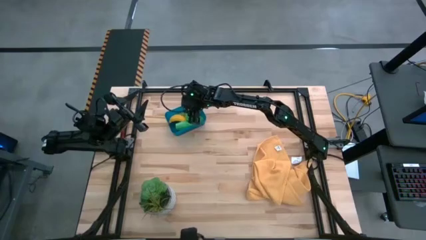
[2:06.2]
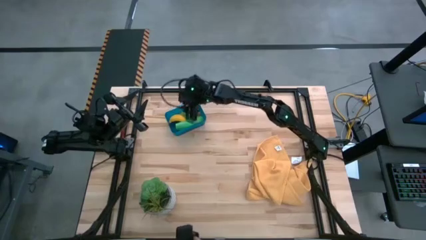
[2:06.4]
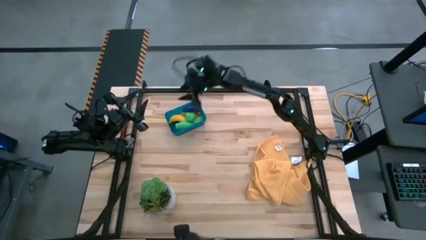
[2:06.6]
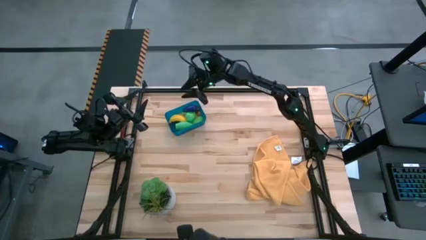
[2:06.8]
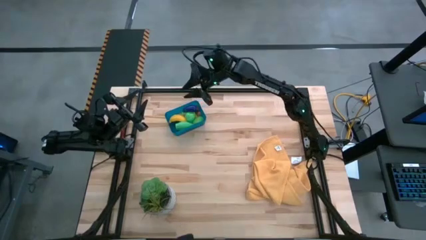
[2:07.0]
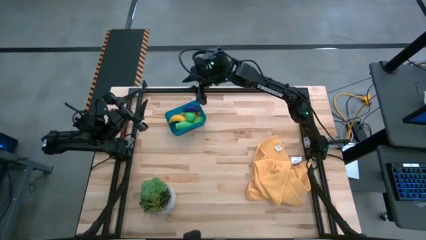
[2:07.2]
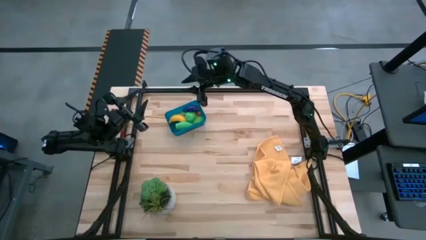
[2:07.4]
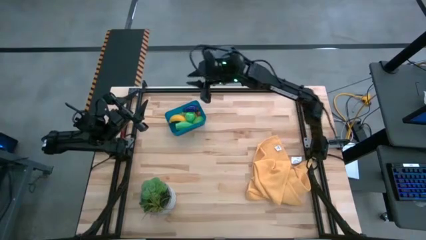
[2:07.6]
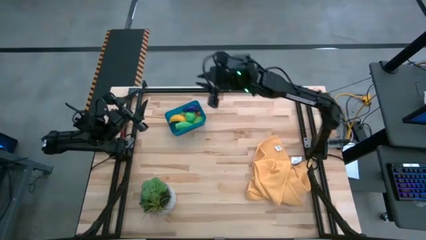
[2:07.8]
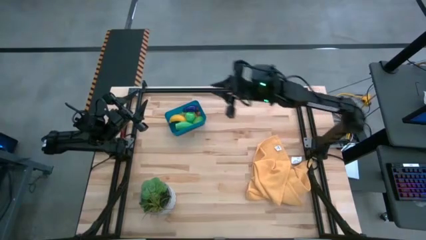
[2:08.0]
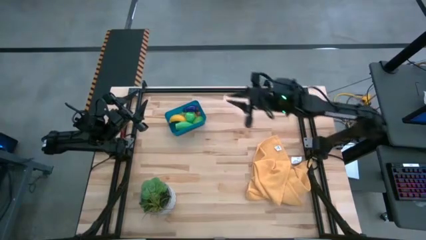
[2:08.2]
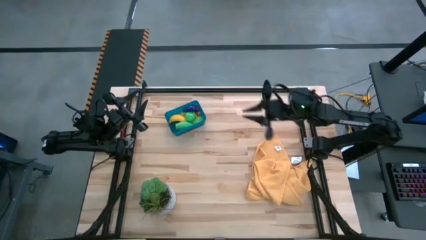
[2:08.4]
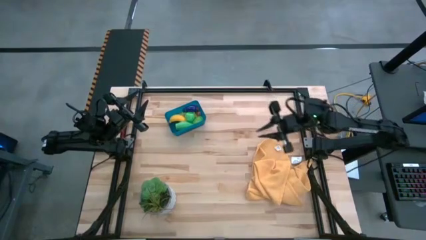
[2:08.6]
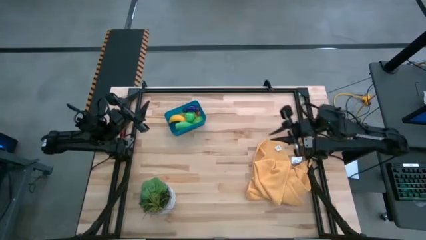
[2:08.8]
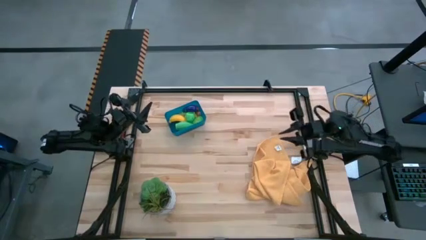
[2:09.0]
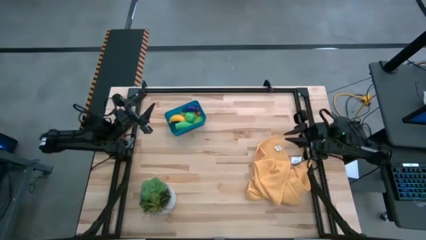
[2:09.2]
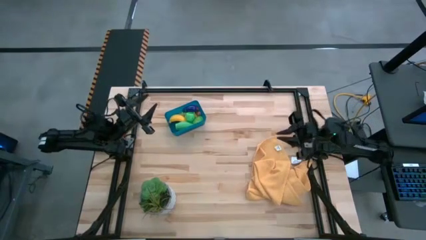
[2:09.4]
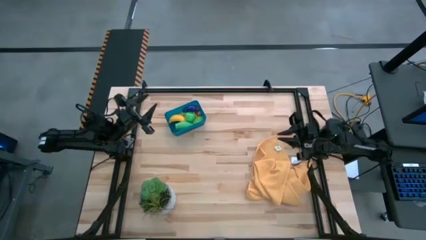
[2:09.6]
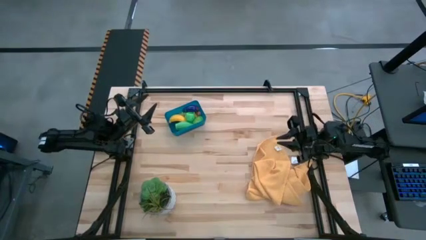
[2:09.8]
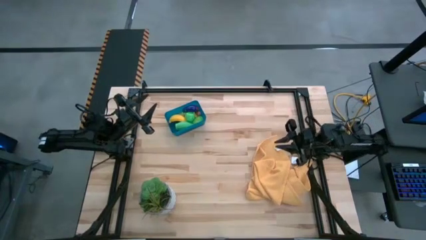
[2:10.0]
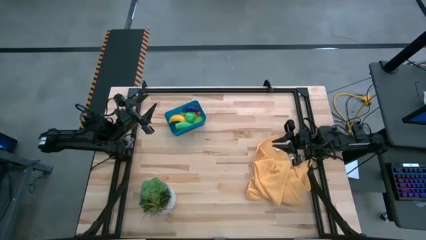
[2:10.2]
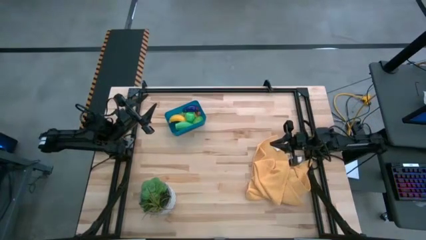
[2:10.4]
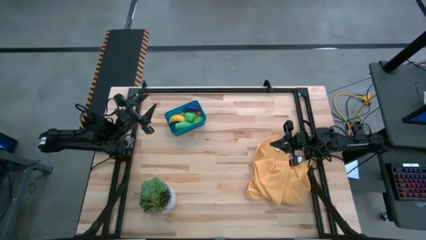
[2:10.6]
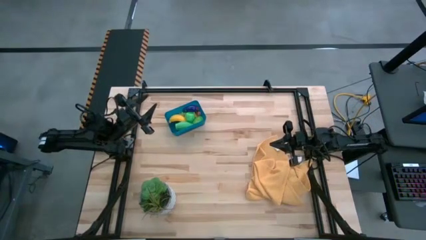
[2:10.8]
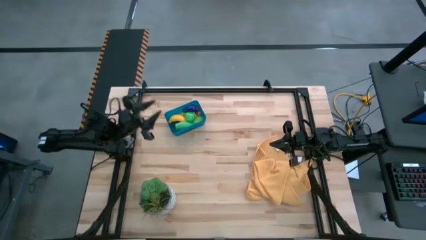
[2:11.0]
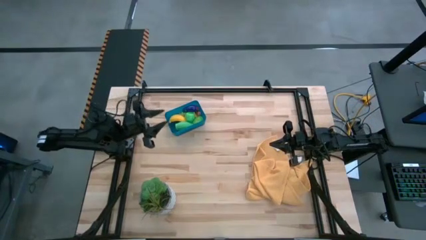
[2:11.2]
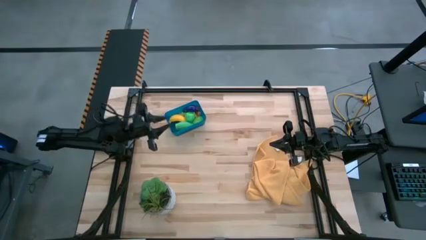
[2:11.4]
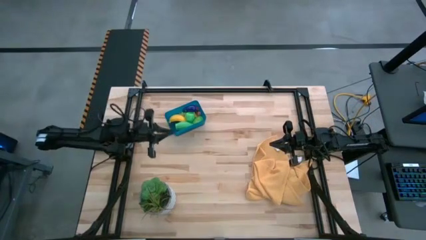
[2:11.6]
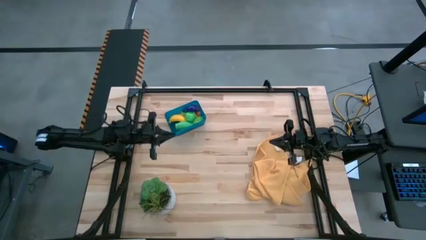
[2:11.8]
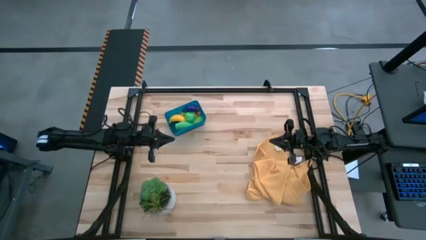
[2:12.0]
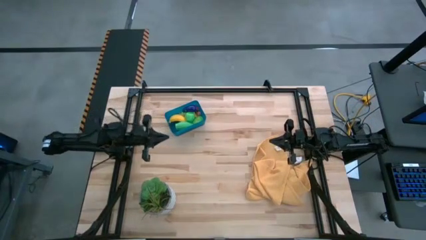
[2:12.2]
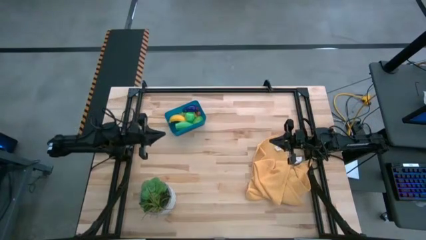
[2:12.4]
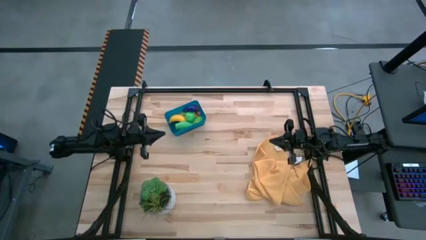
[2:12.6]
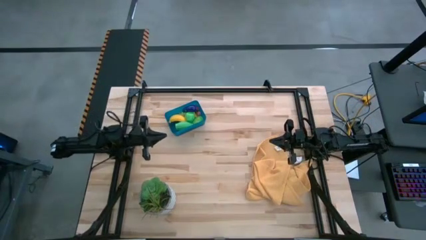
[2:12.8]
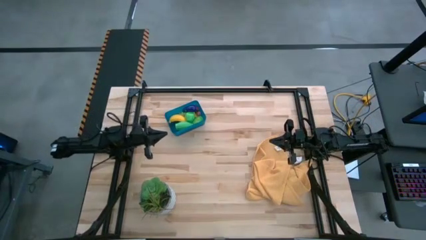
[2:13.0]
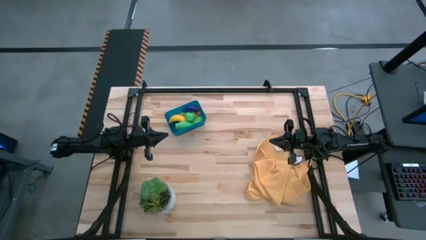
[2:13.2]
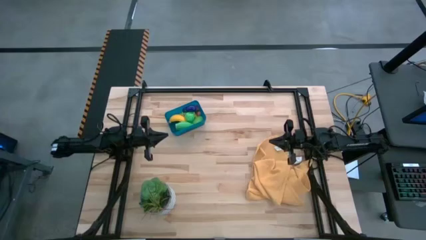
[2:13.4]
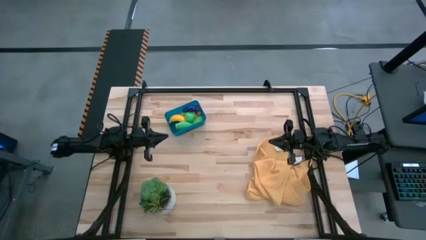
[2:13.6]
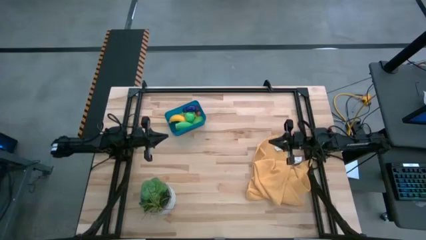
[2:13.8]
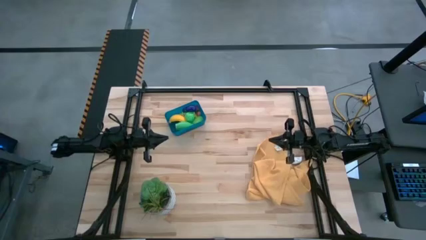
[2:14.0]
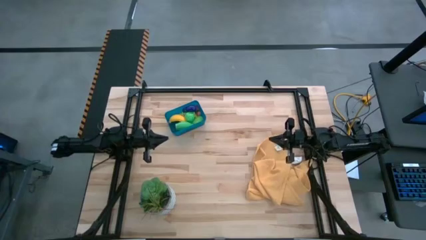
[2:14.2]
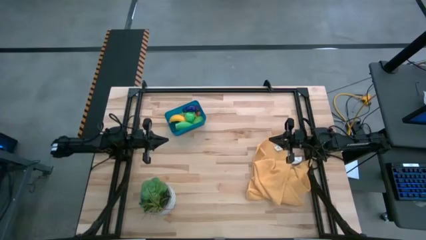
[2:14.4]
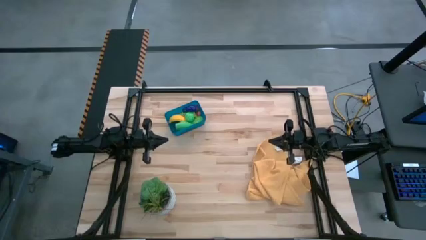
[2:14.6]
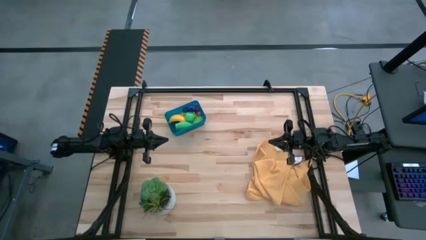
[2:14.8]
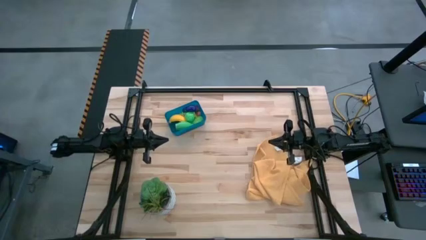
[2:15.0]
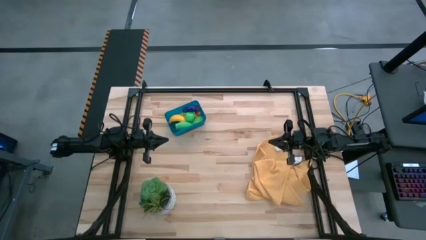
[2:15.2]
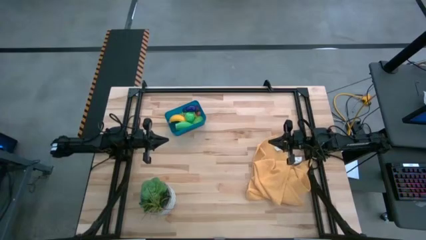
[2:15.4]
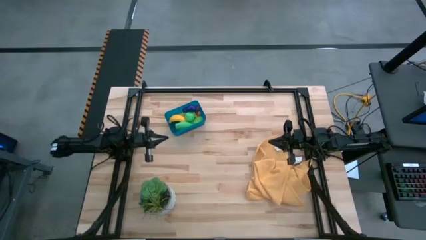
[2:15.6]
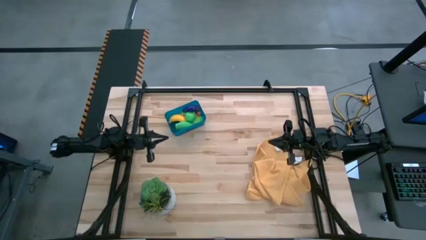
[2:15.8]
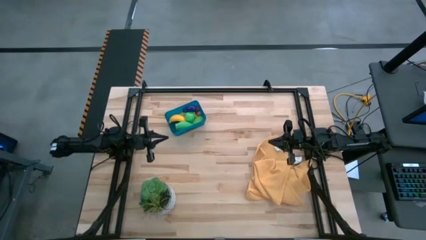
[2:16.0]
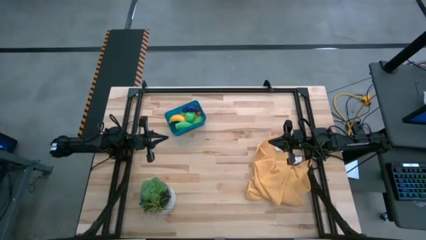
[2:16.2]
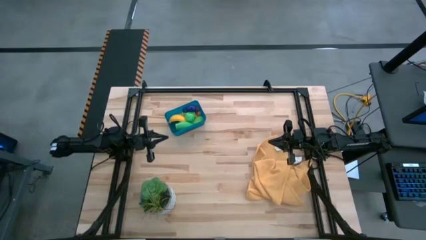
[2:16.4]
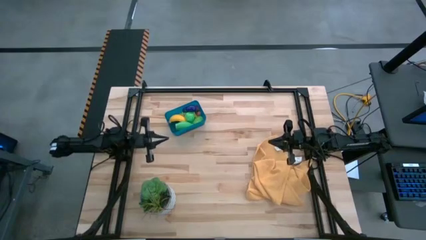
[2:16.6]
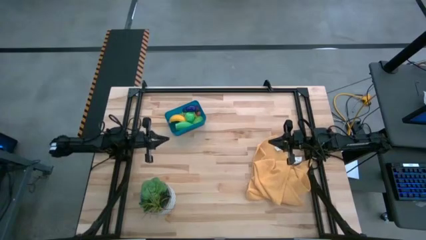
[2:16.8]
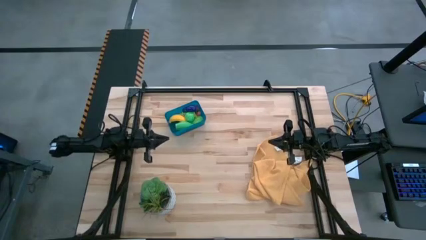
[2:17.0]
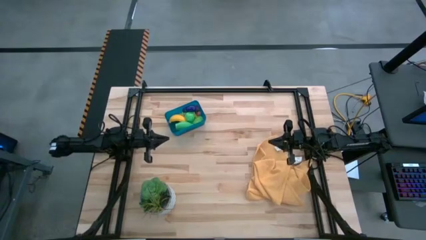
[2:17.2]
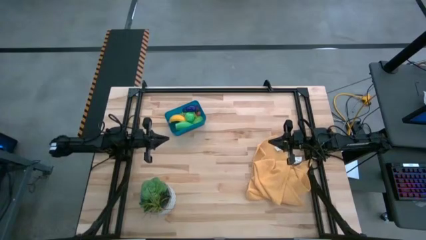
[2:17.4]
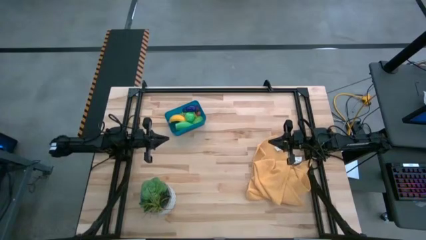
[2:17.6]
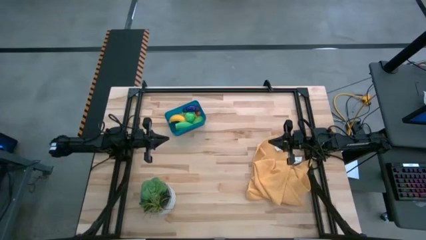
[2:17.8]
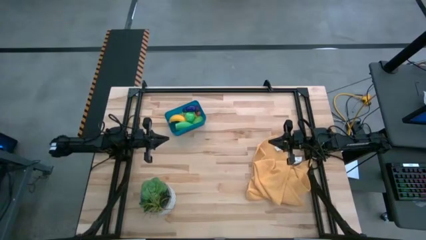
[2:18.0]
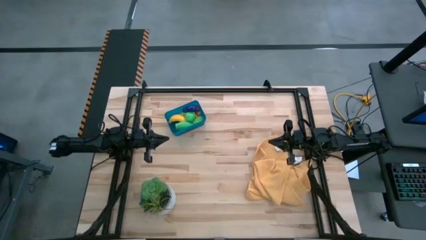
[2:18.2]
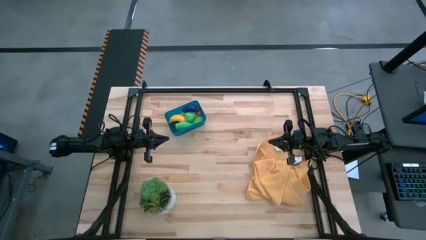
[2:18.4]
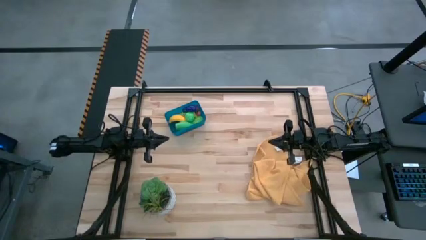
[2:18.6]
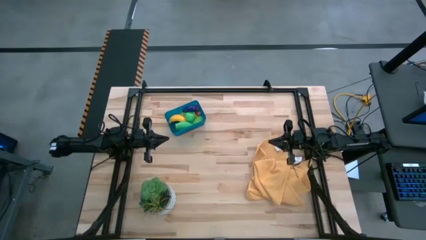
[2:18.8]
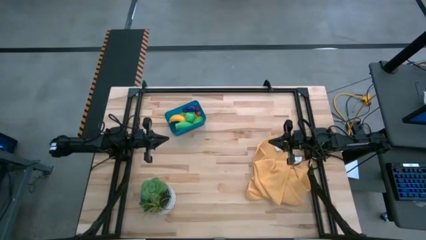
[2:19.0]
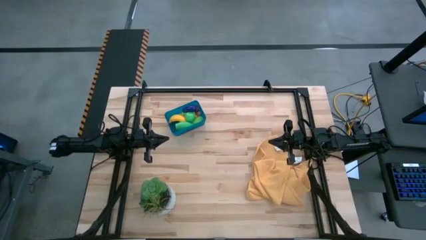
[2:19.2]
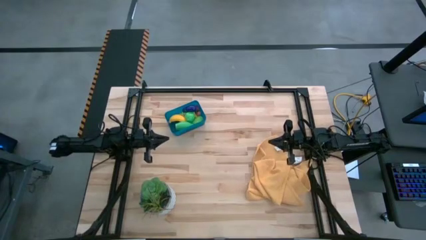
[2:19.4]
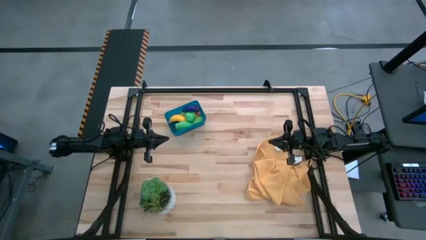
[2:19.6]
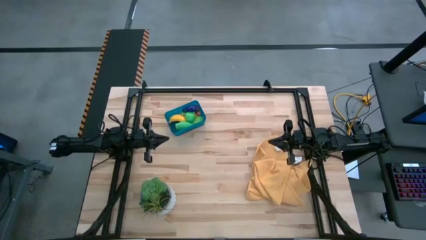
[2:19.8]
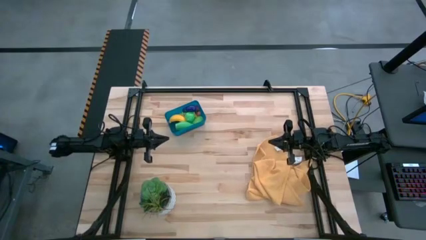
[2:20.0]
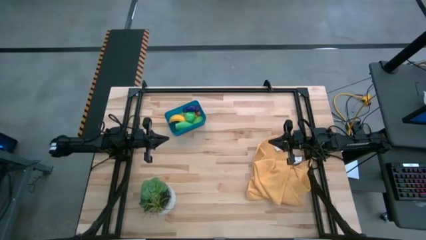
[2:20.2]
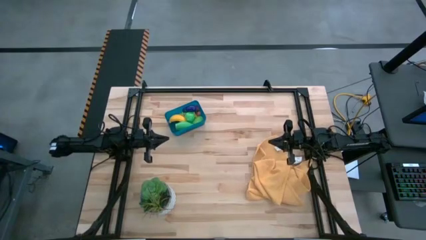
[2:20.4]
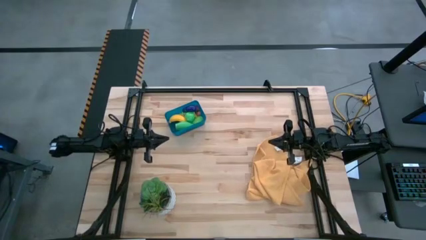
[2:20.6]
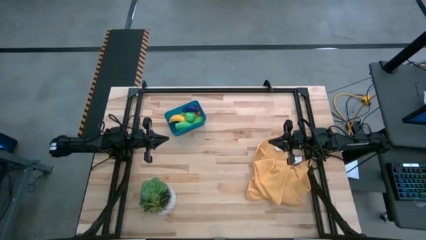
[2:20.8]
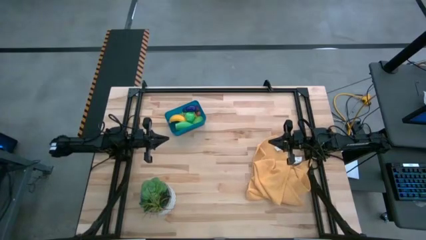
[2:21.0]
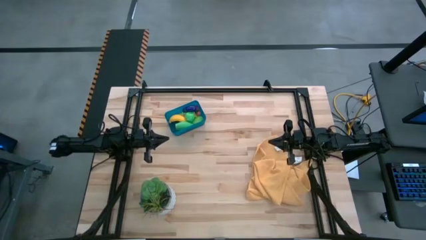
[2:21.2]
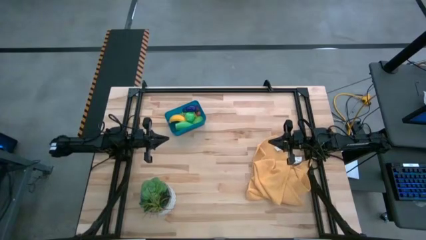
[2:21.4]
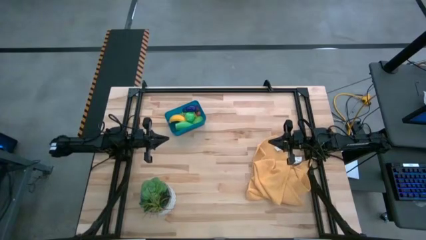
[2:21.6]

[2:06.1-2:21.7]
Task: Pick and placing Produce into tupperware
Return to Home Position

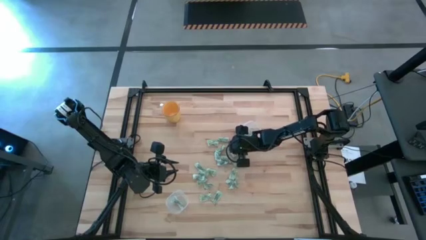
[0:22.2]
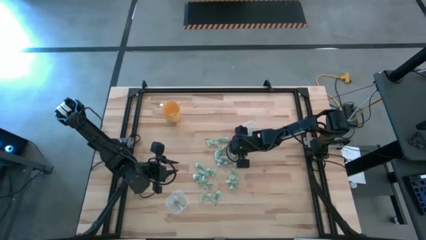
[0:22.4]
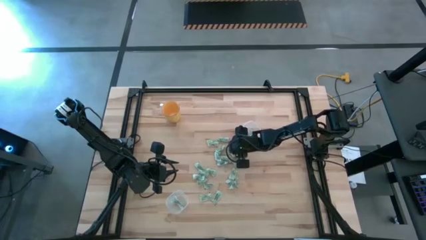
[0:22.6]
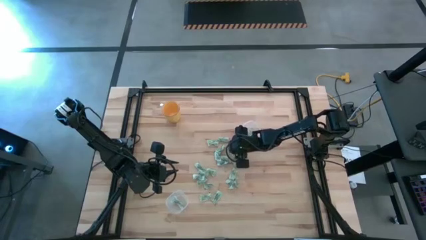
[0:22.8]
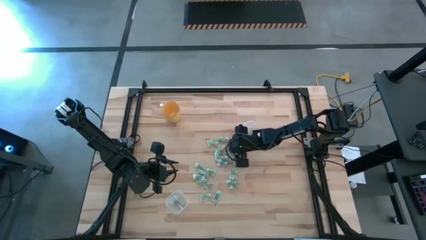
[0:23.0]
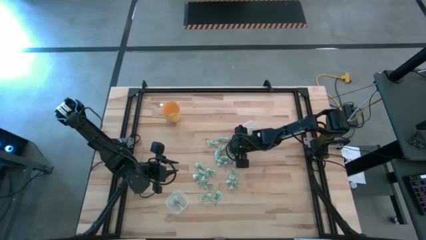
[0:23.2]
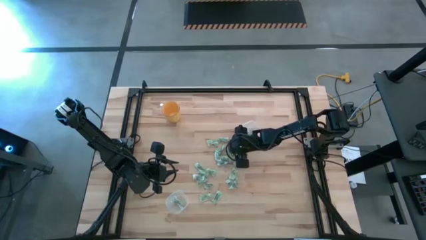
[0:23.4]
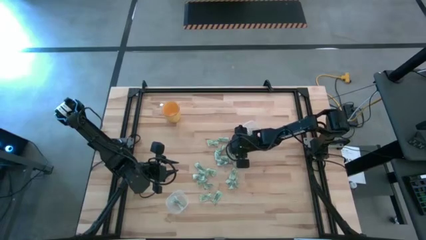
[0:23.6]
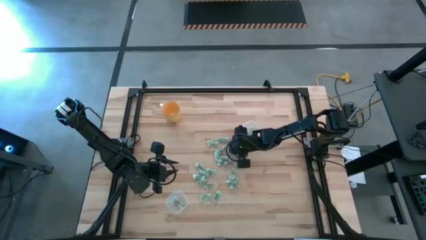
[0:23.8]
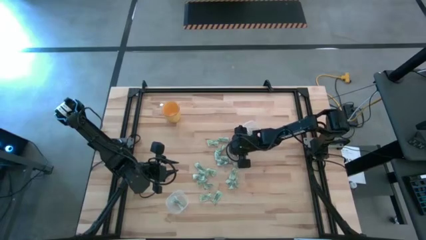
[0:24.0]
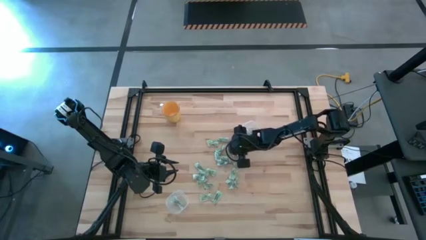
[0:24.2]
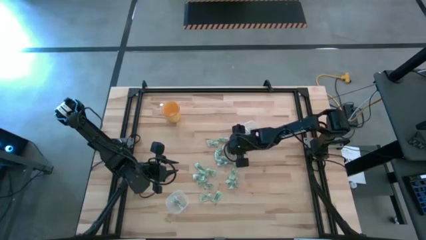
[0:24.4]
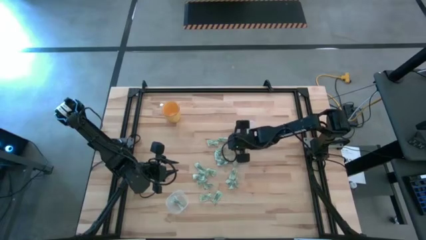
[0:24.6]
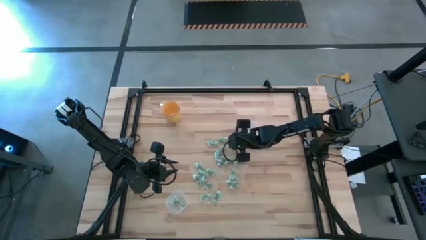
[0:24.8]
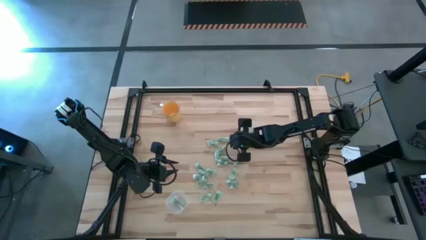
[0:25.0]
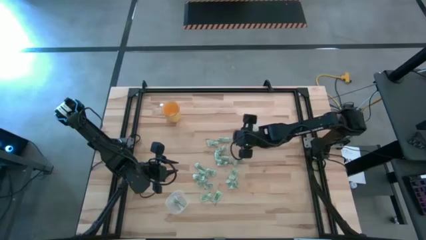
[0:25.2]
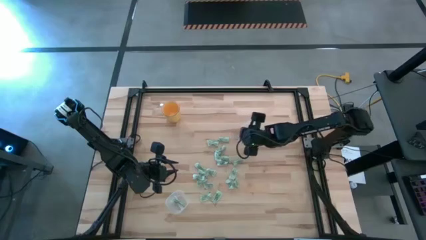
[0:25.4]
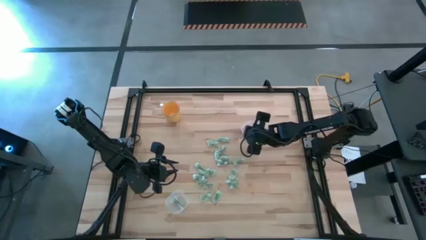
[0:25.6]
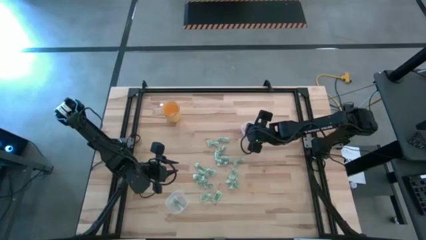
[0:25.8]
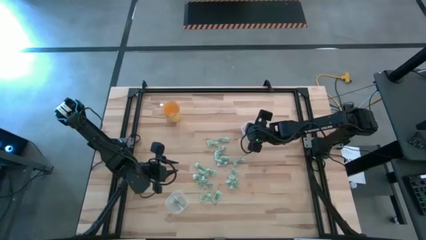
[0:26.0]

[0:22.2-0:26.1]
Task: Pick and place Stevia / Truvia into bins
Put the green stevia packet into the top transparent container
